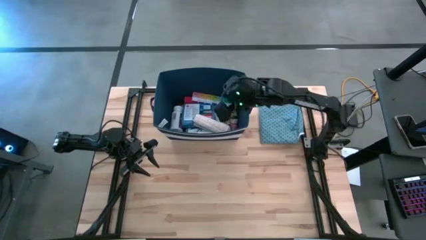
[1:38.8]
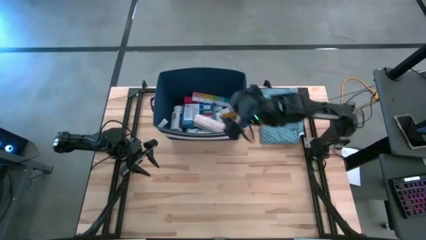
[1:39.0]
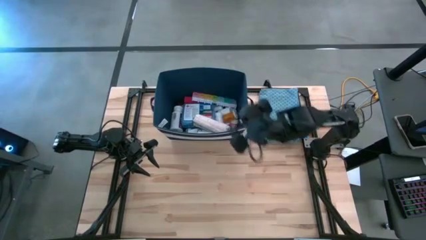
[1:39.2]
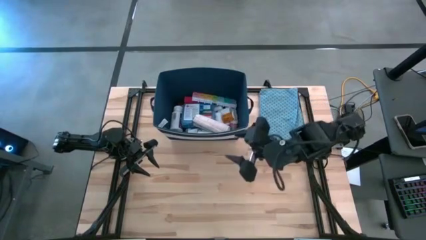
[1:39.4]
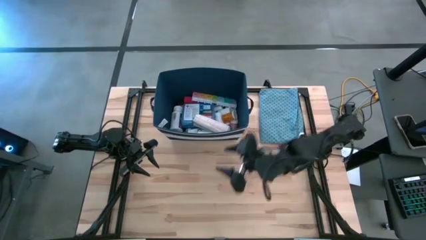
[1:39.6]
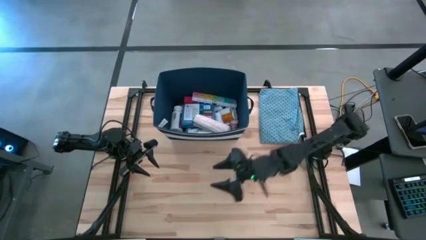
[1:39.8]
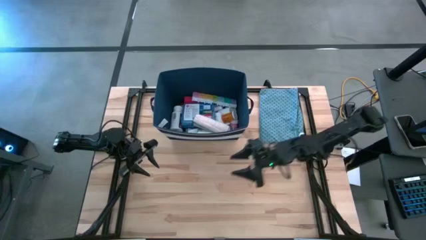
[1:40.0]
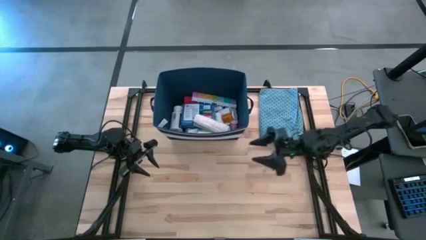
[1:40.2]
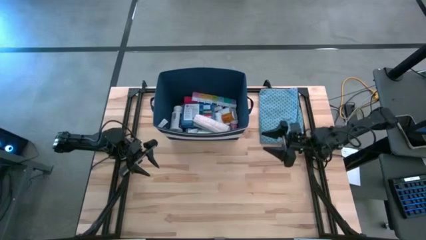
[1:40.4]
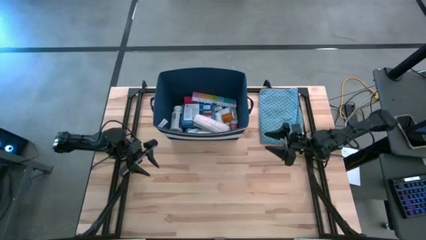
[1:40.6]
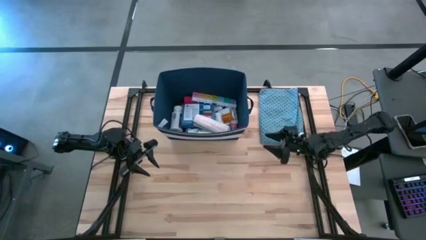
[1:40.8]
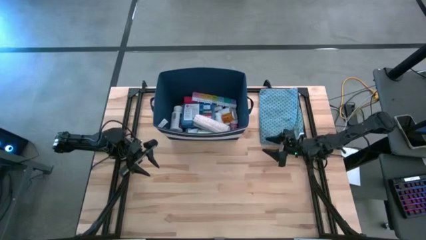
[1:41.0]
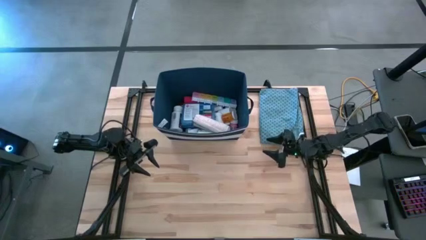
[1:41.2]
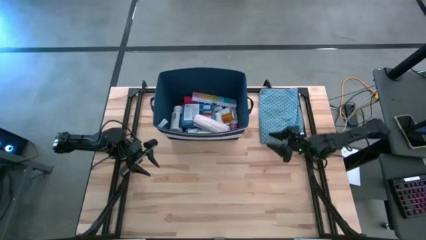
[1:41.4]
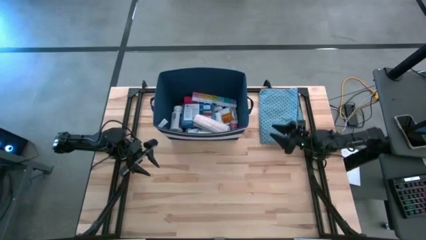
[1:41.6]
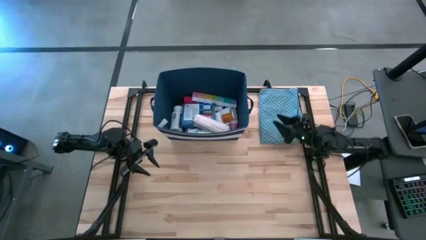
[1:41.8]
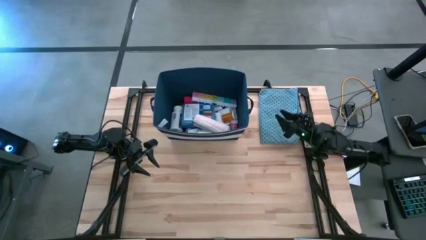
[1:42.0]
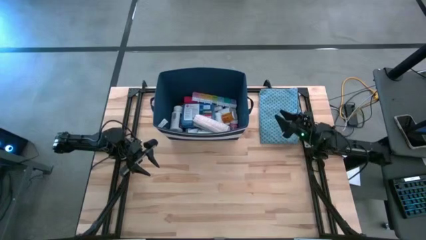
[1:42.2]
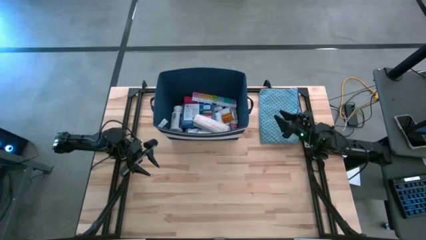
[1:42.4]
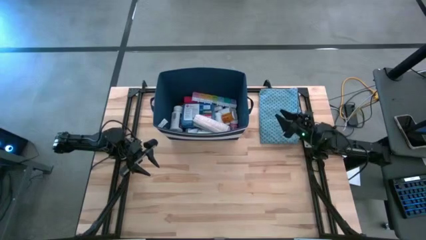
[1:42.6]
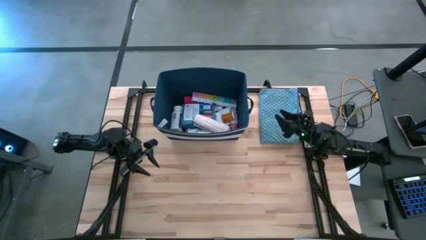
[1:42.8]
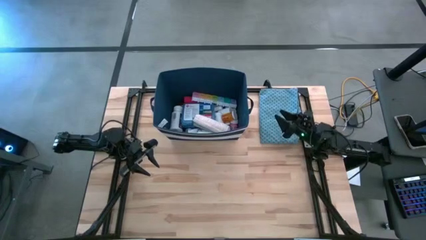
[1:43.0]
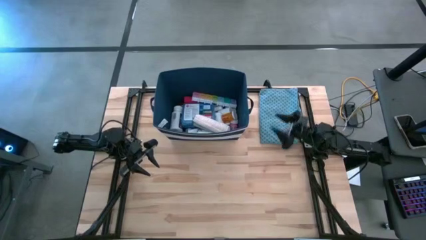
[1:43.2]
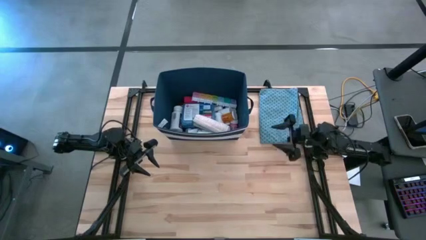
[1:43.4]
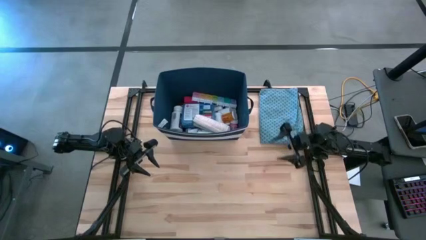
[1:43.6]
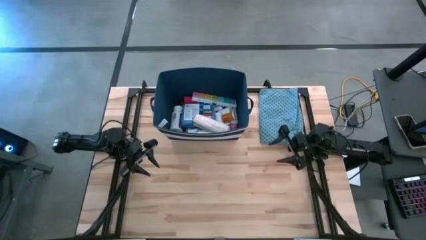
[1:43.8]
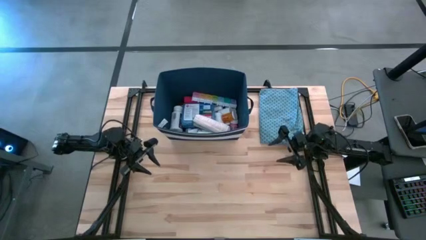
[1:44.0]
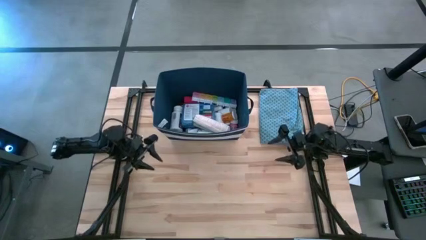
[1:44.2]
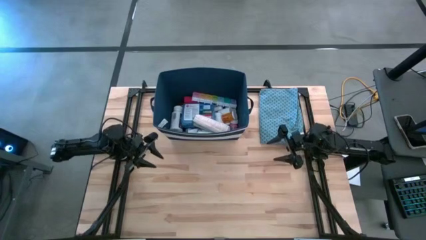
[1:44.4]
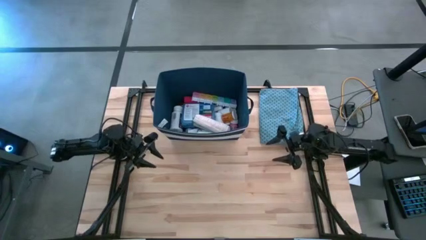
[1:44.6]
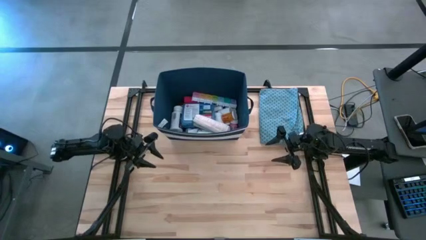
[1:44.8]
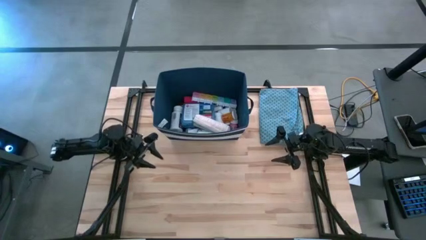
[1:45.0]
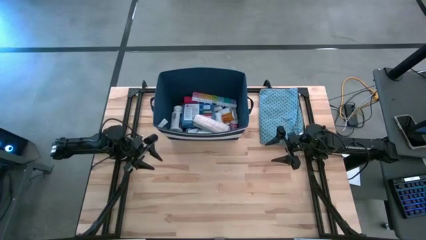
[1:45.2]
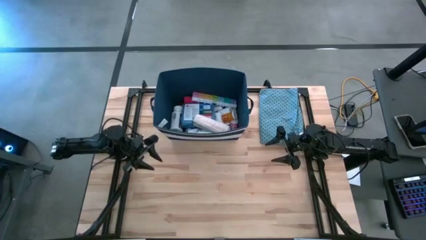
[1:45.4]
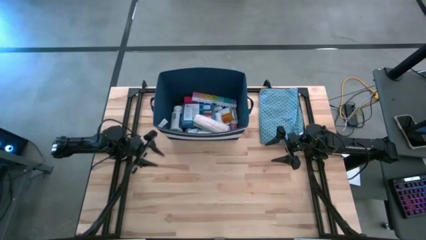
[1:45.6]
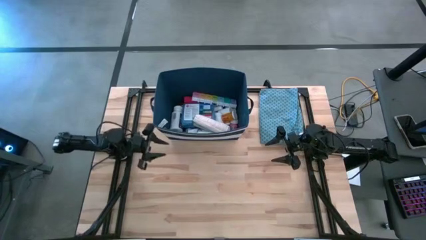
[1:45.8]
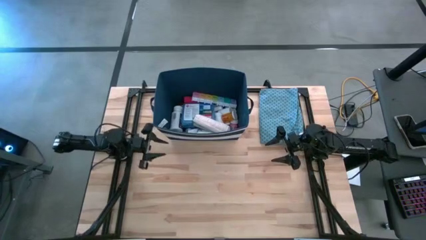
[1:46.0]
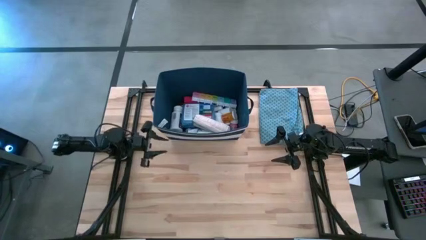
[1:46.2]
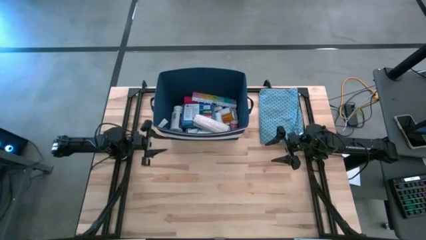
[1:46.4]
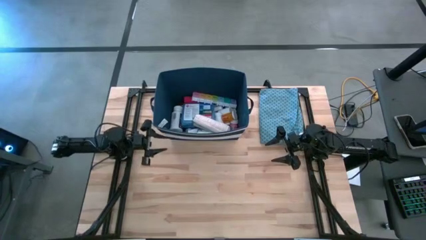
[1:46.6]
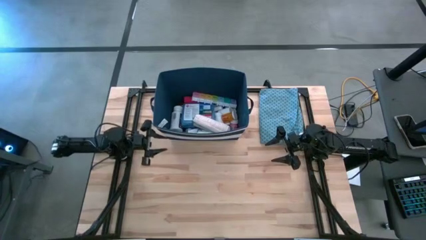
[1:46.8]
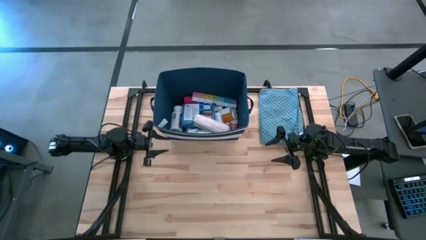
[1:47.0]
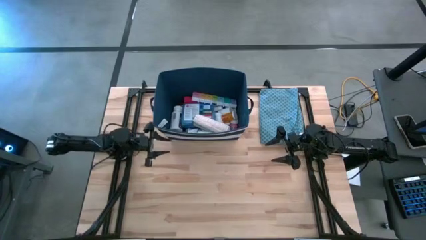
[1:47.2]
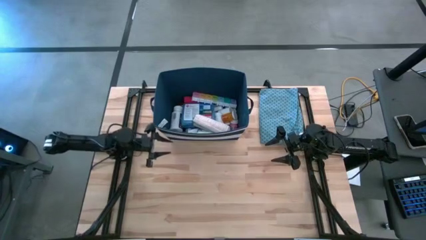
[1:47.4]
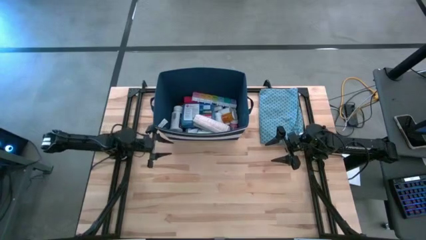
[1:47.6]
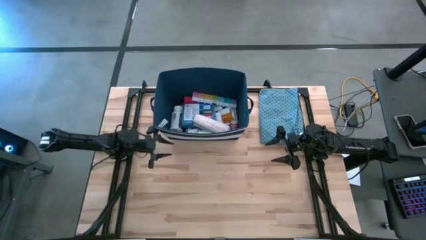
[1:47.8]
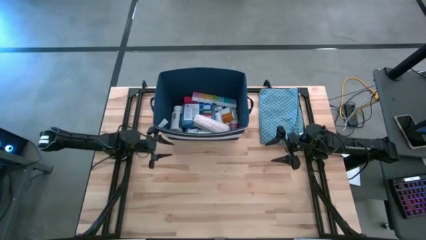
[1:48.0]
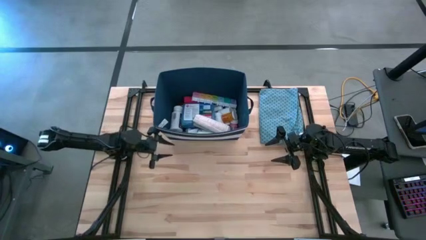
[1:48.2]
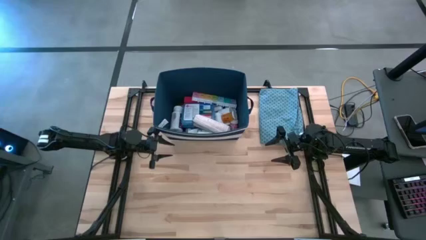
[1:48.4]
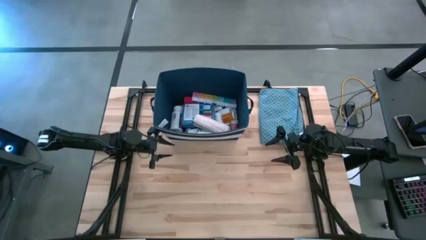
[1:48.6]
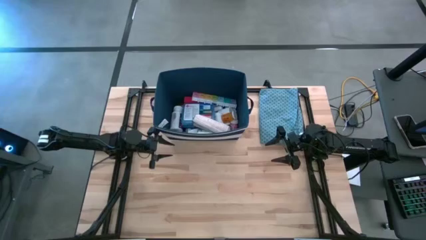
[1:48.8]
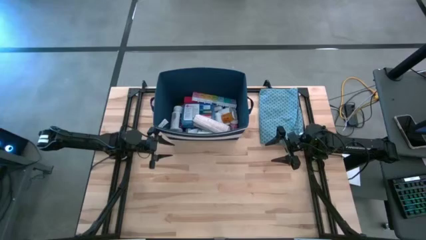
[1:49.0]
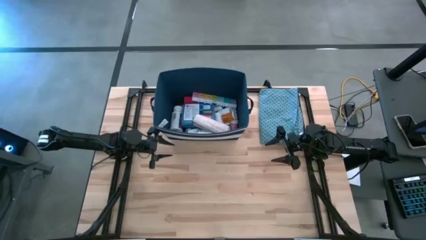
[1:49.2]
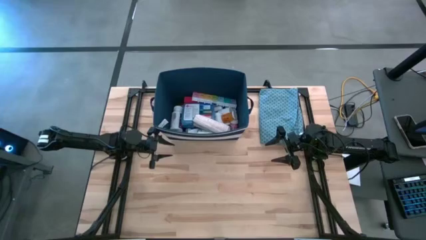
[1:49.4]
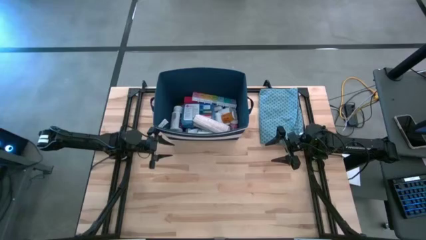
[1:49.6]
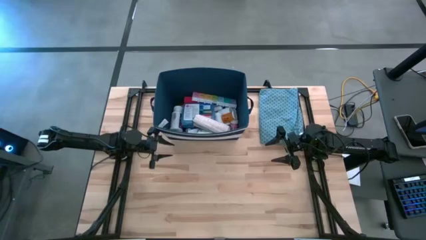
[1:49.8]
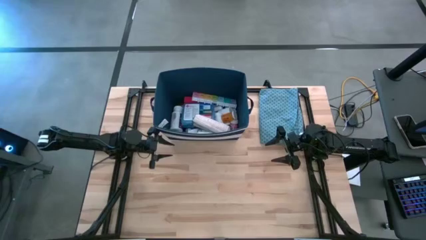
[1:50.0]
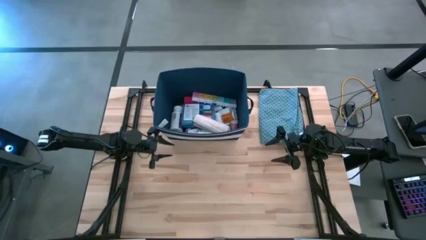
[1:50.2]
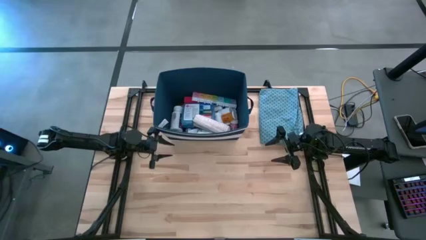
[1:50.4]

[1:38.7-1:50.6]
Task: Pick & place medical supplies in basket/bin
Return to Home Position

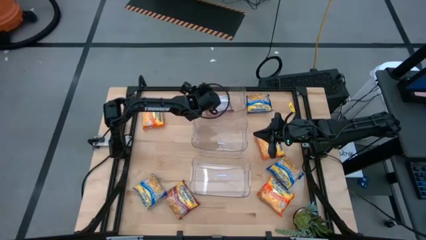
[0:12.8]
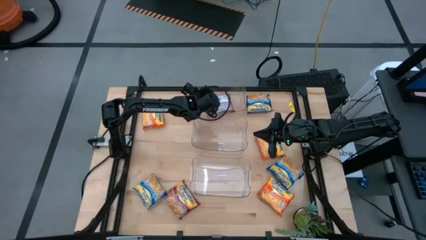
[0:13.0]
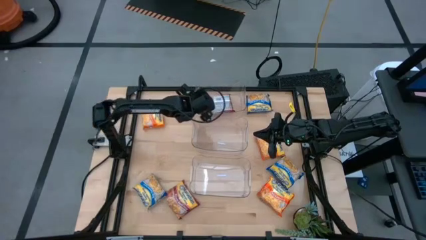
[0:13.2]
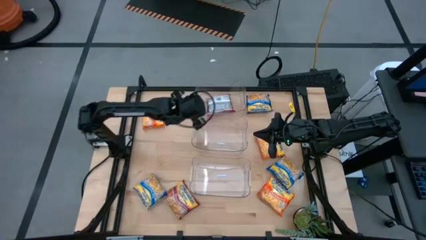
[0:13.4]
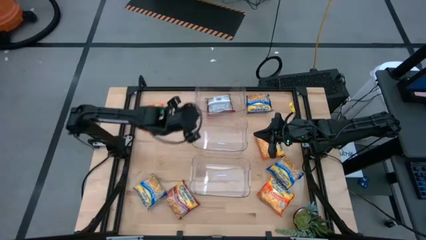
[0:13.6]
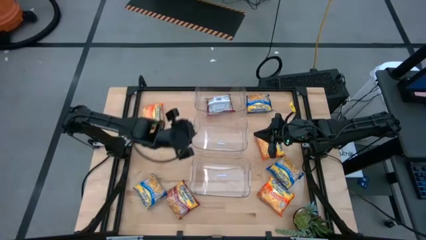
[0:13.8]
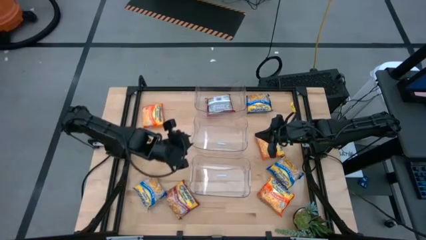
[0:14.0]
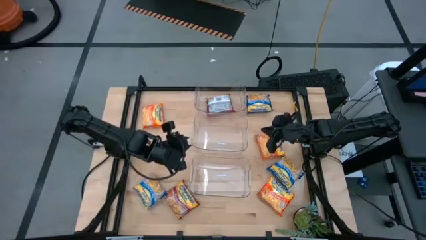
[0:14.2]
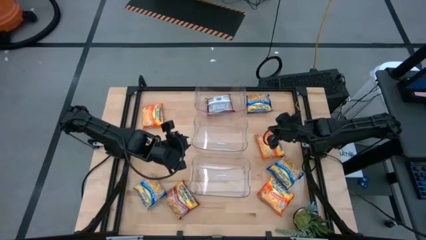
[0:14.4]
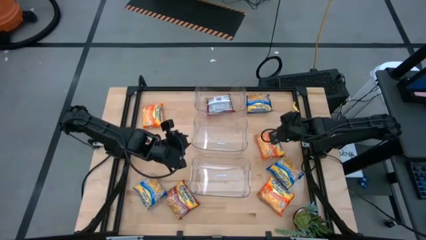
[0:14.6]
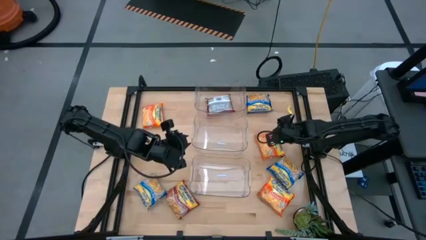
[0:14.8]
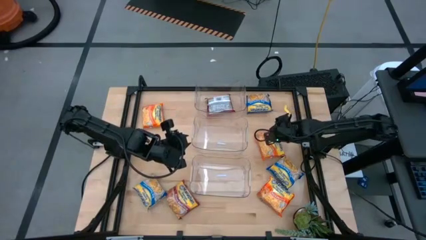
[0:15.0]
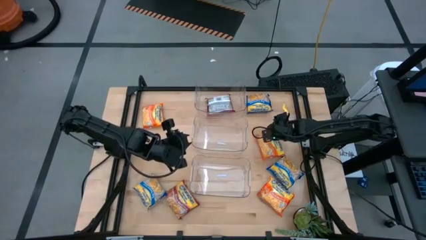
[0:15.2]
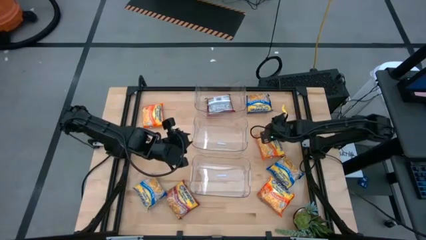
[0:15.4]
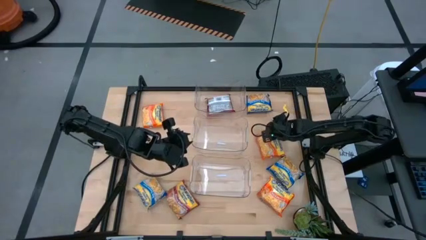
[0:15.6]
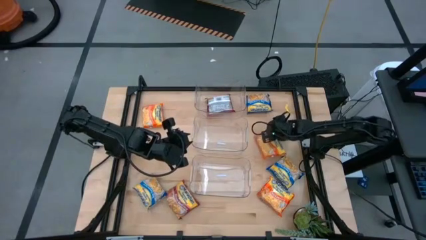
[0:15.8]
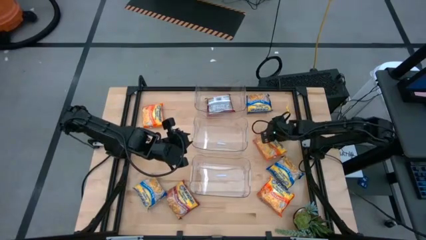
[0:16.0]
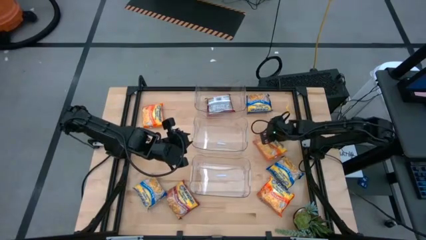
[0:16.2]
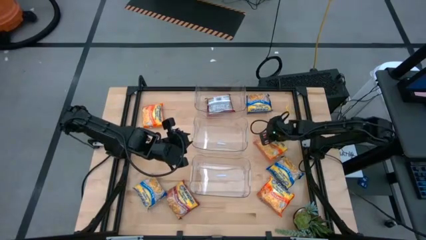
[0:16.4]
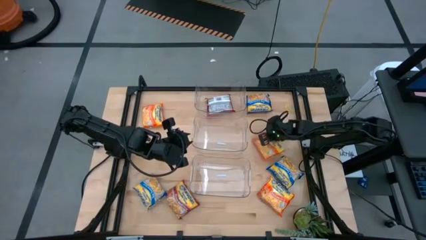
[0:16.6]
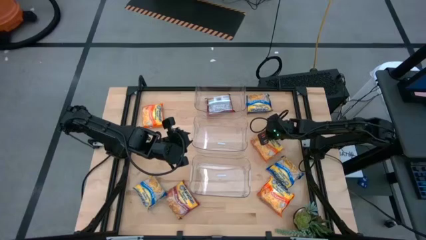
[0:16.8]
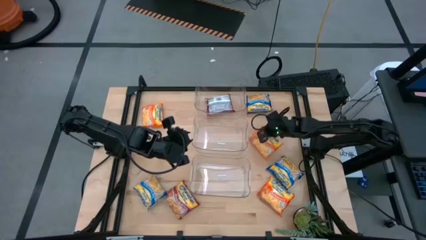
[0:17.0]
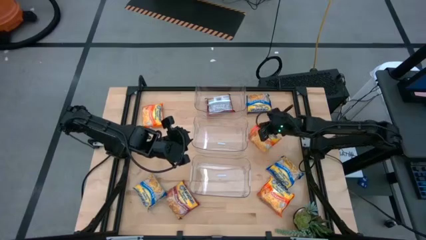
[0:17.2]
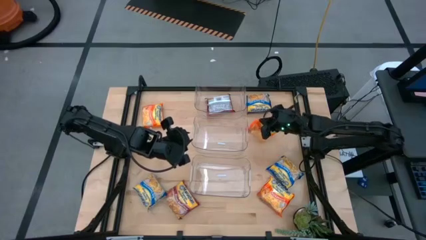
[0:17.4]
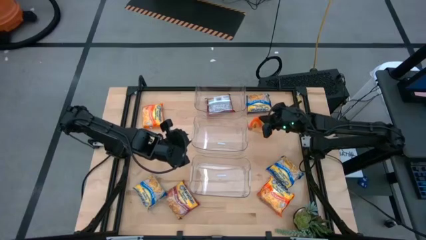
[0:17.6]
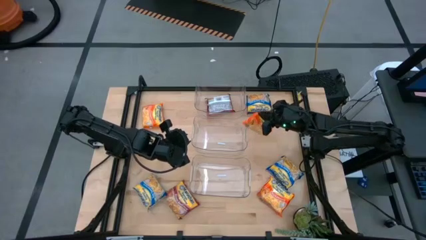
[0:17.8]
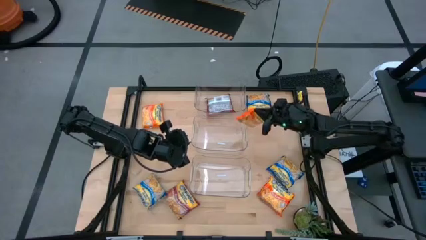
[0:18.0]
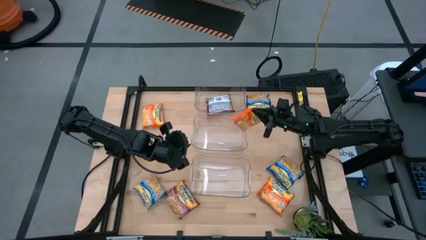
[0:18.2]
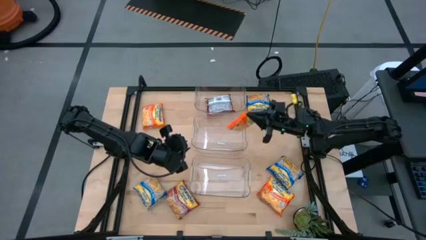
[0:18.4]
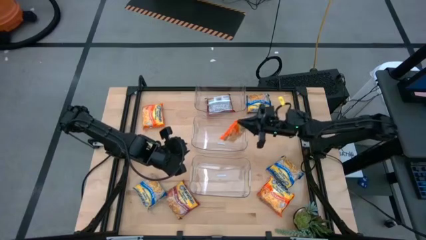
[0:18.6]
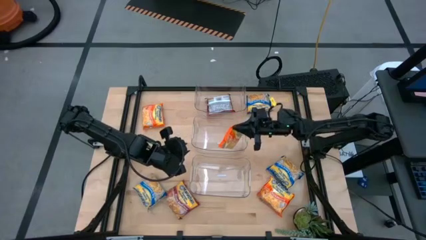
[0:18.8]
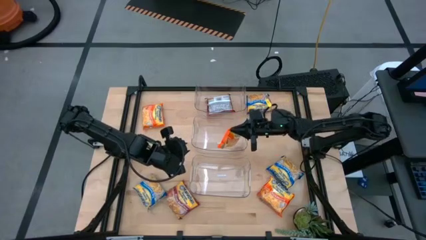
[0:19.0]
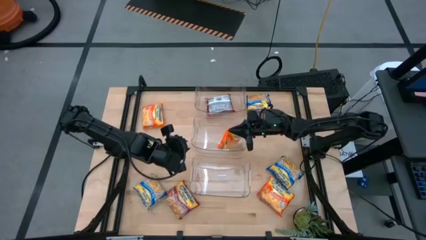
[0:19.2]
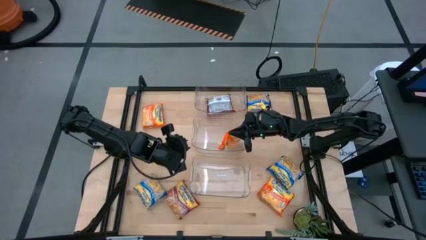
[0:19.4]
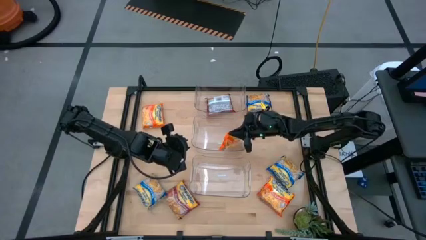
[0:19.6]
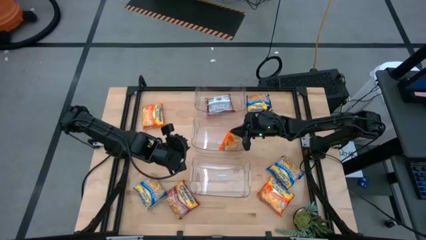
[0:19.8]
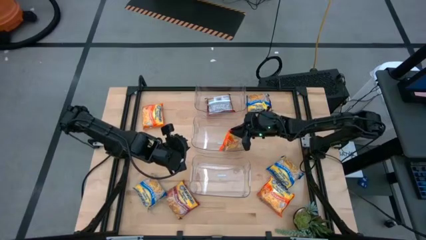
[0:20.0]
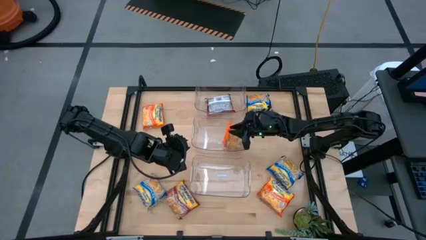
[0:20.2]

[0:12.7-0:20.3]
Task: Sort Maruchan noodles
Put the middle right orange noodle pack into the center transparent bin
